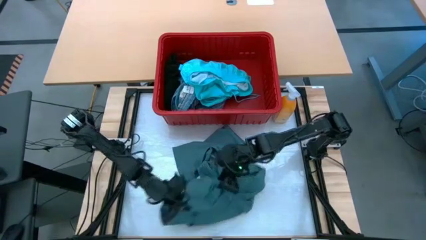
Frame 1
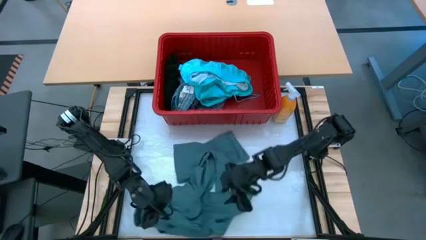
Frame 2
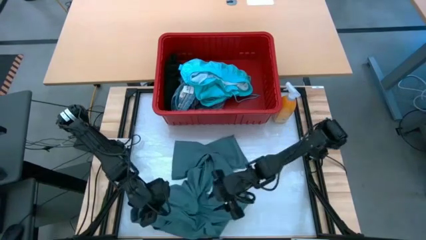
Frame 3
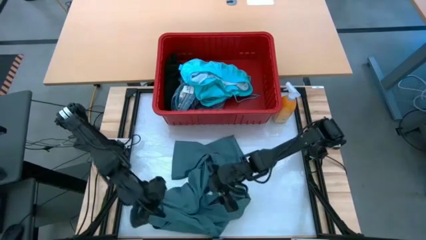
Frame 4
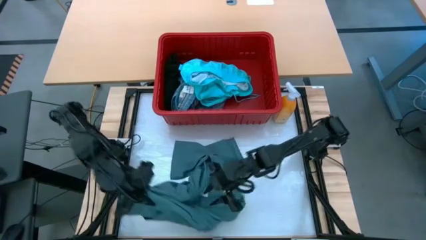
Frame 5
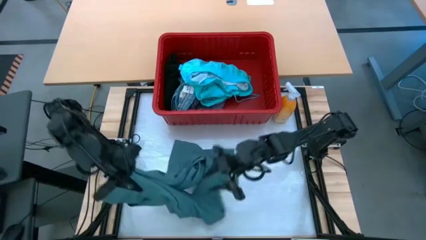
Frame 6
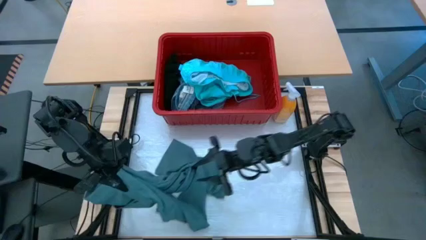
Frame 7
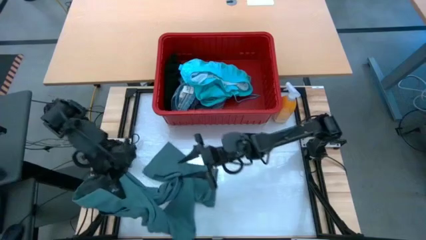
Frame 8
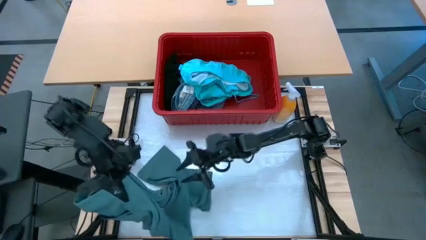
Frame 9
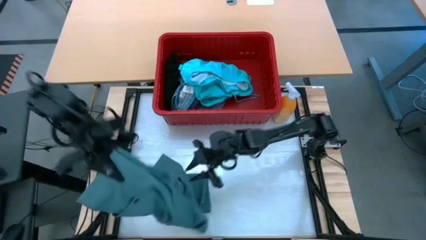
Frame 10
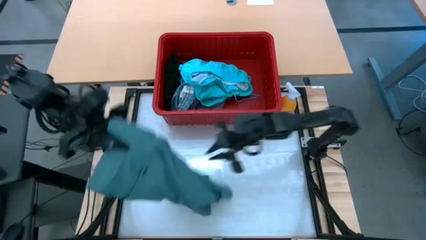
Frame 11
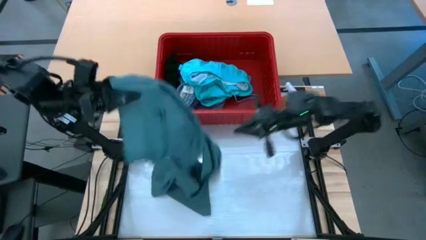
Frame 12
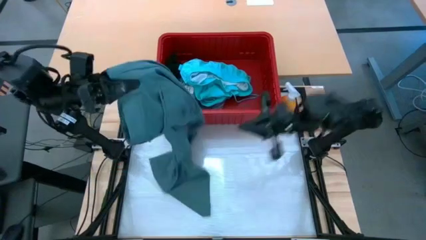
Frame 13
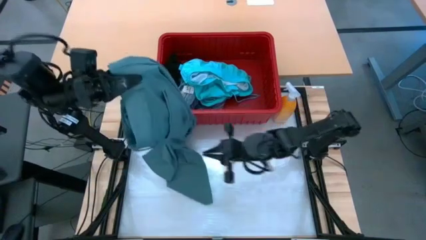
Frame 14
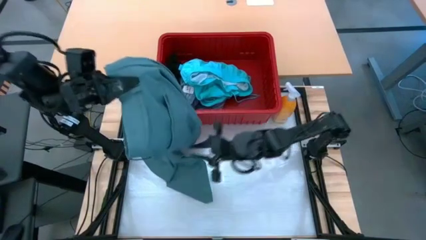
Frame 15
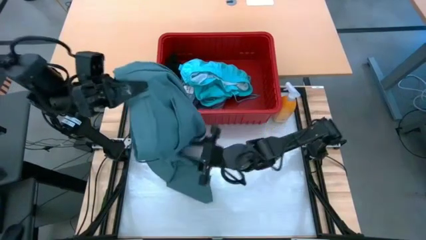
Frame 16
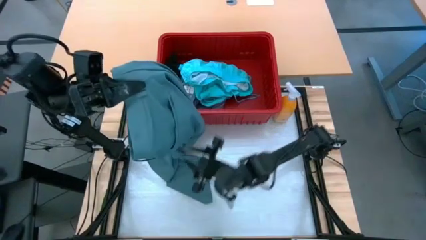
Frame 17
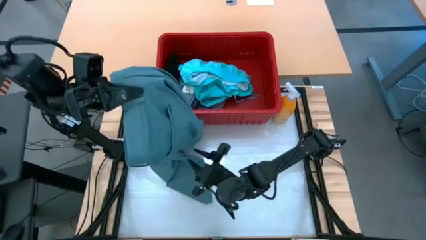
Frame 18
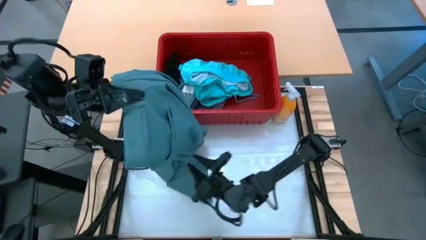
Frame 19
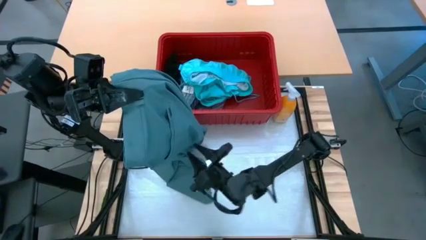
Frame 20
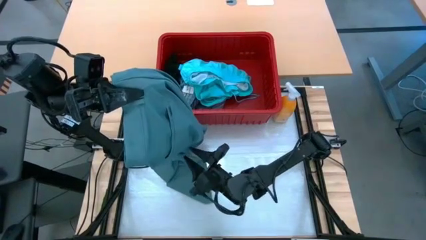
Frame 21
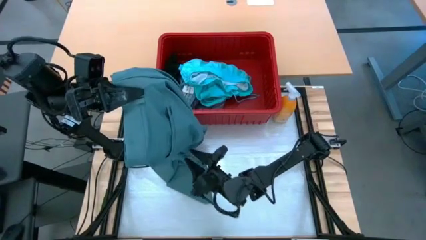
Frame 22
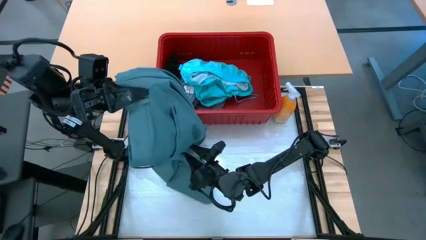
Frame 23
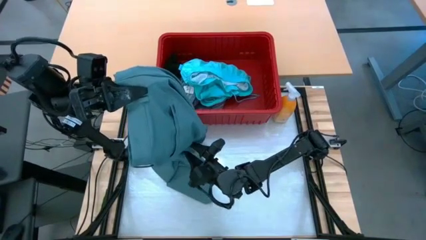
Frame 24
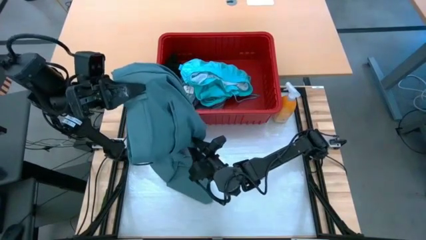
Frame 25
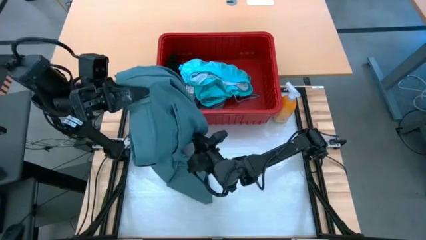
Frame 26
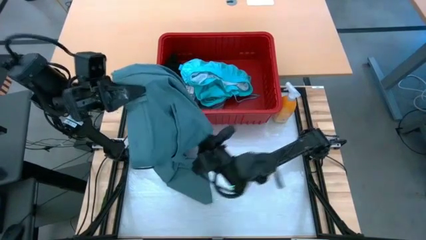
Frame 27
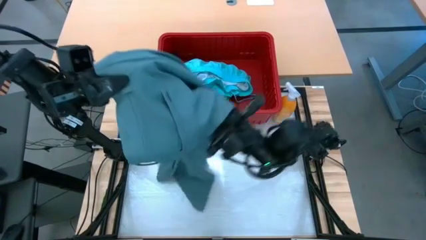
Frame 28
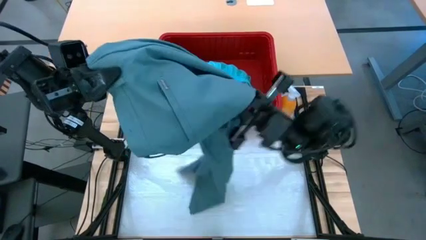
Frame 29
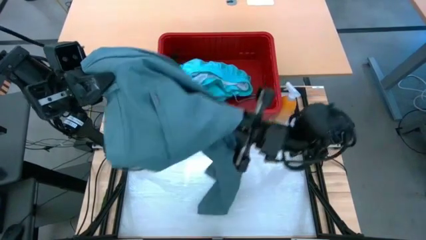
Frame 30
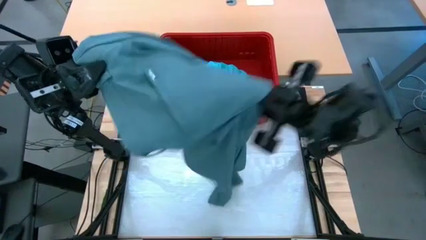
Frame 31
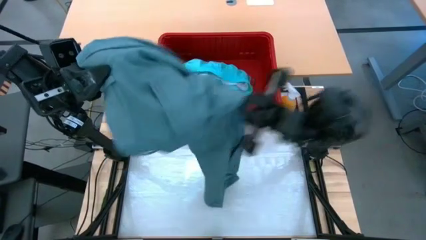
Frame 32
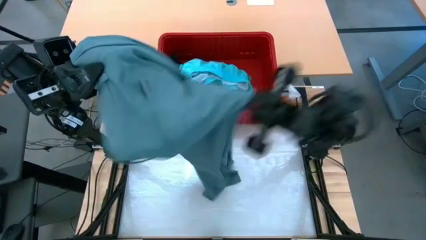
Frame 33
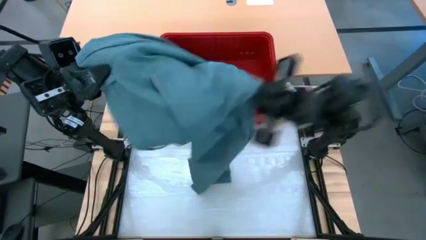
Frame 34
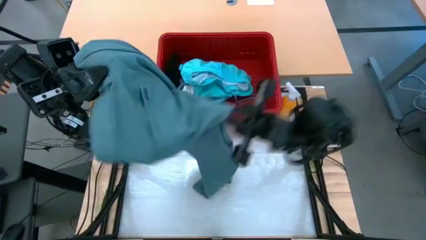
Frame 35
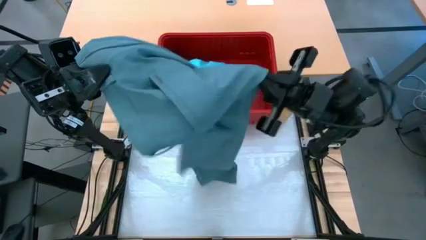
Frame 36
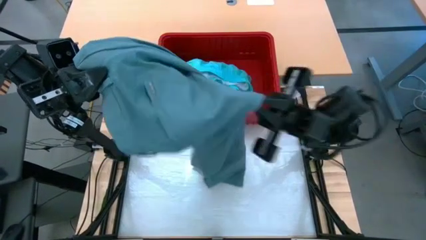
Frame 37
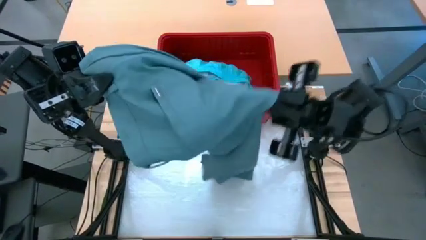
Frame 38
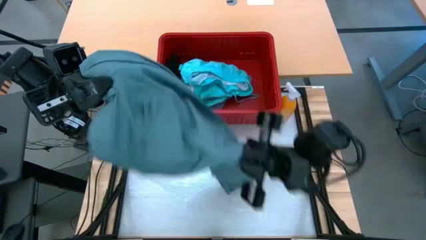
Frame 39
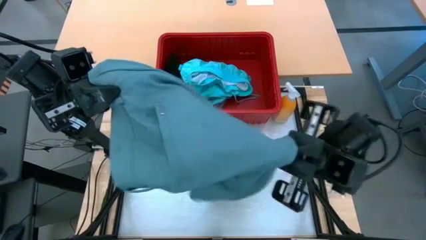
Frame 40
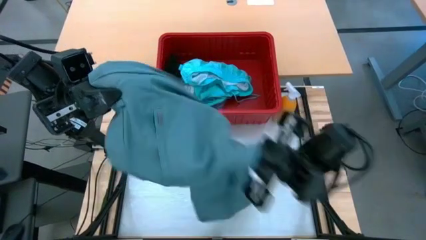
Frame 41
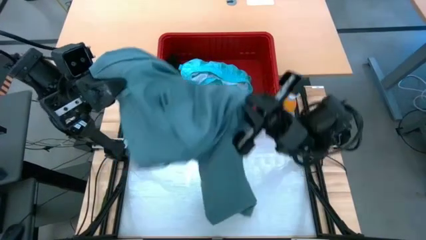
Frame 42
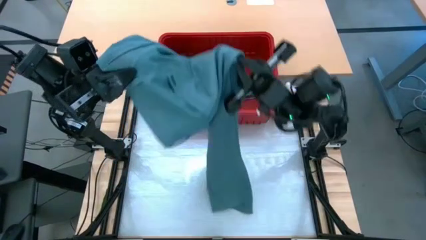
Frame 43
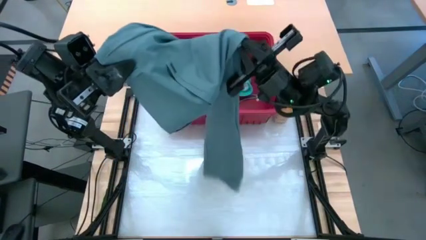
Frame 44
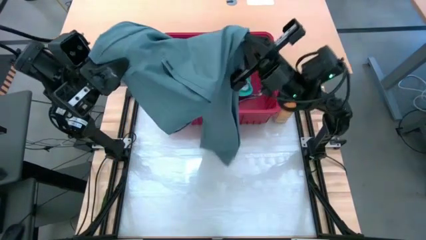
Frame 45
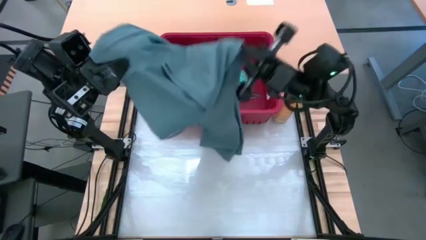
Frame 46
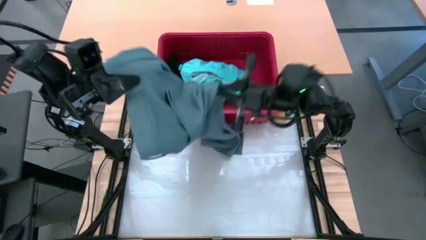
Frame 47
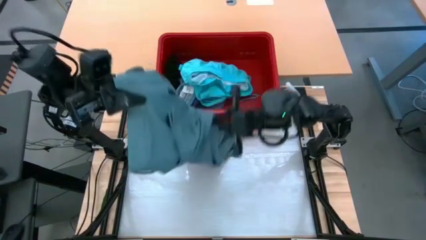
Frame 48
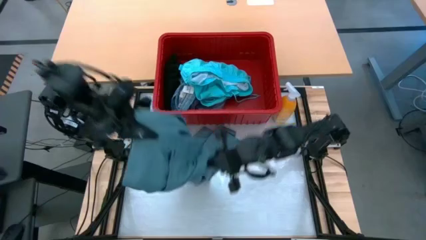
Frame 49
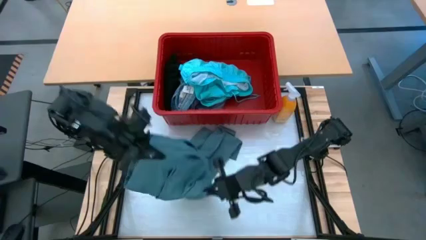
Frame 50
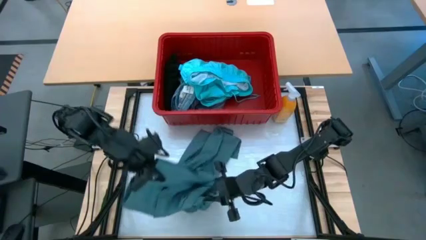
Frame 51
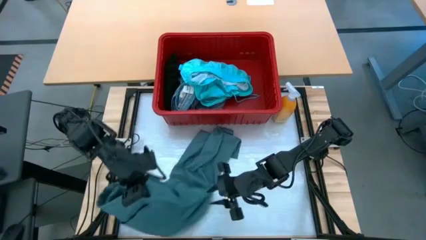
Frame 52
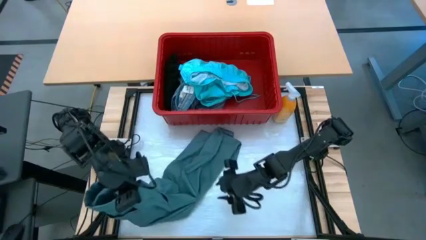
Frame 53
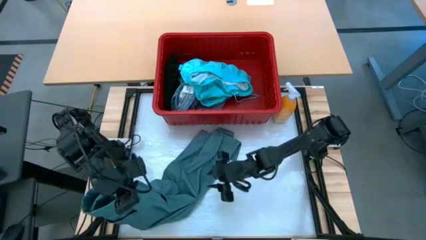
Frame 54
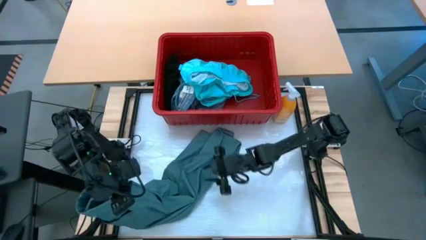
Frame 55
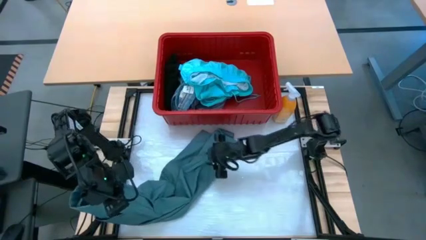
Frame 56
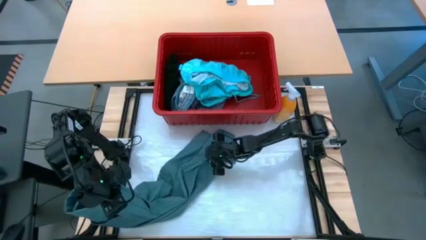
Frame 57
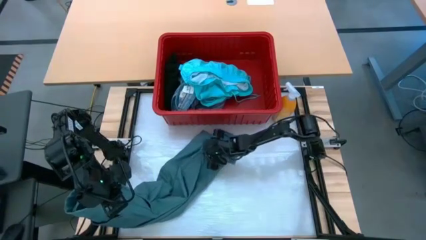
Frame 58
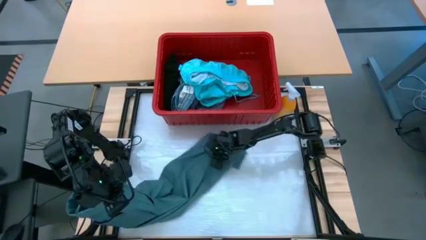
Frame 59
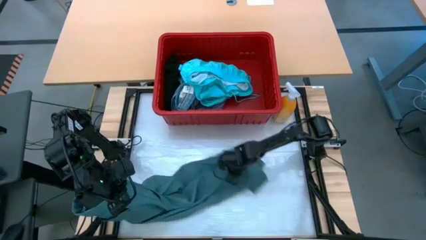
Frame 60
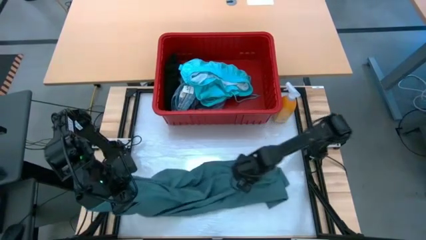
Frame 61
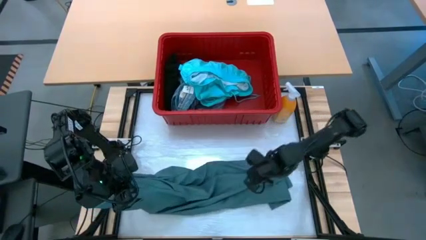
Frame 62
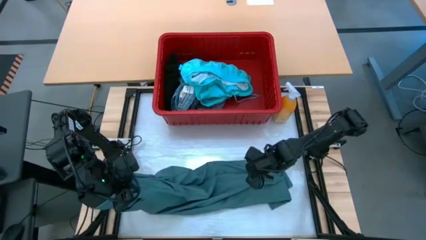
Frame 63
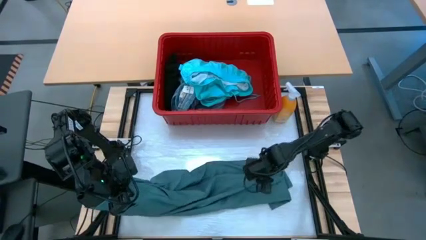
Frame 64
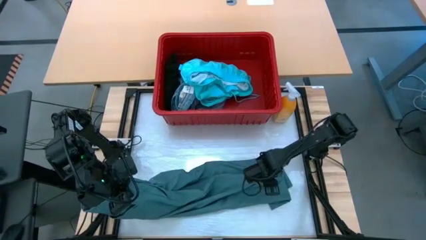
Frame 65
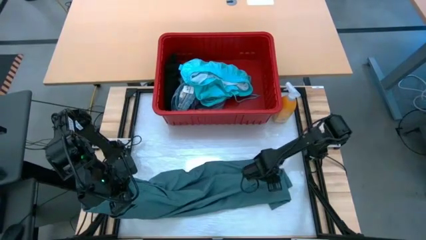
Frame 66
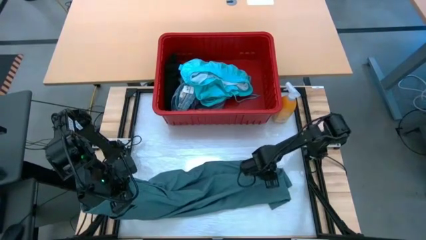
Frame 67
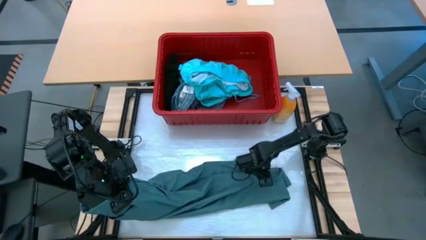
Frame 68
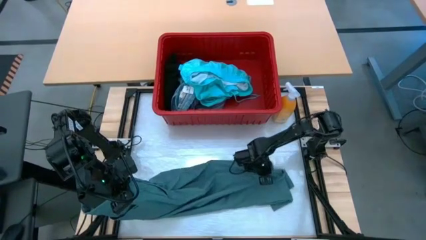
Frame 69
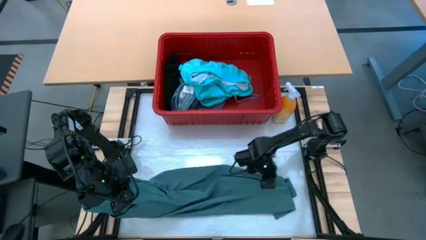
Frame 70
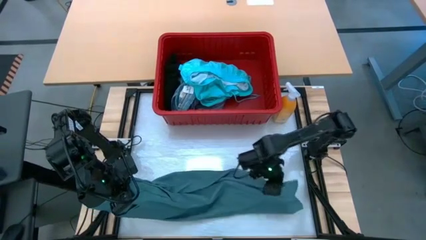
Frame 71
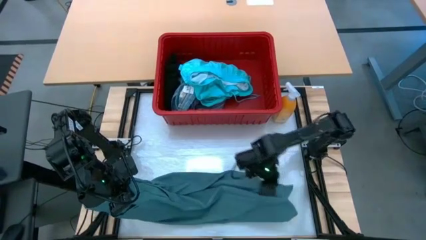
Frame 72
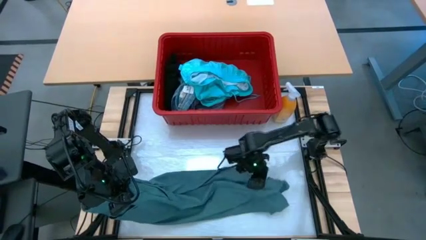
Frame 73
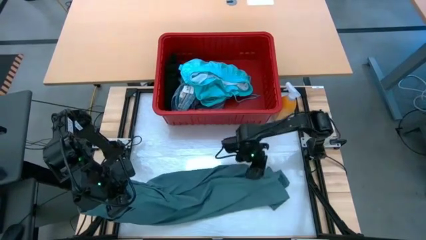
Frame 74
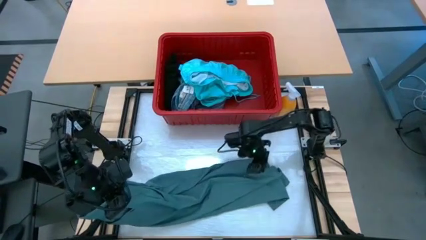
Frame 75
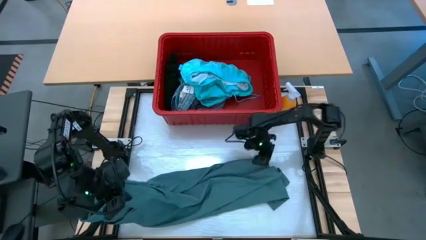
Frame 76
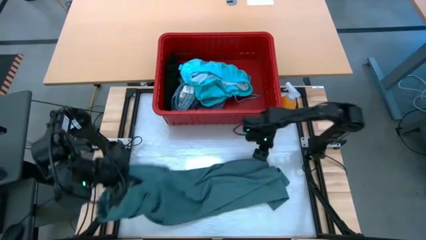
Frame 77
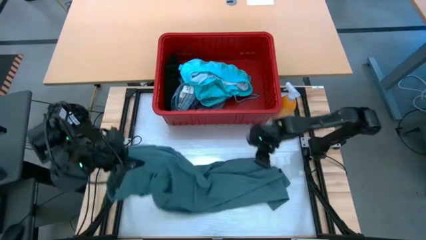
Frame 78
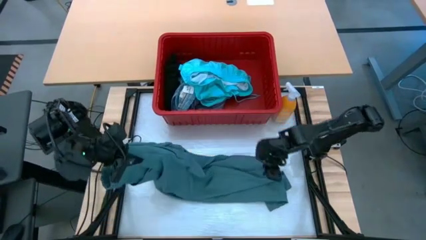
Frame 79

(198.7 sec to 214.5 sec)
Task: Fold Laundry from Bin
Fold the light blue pants
